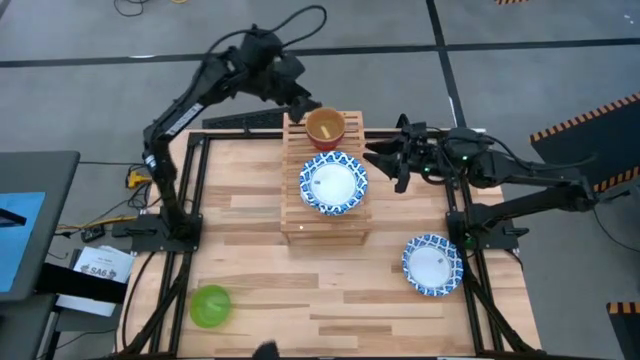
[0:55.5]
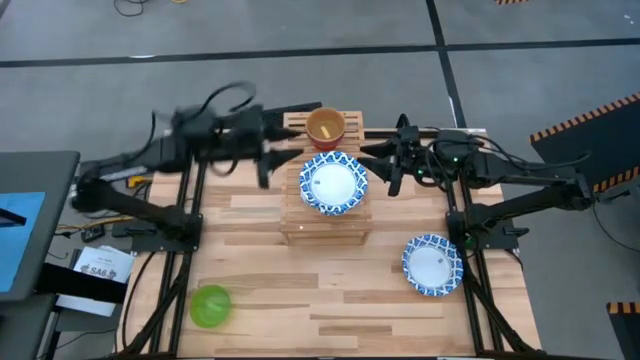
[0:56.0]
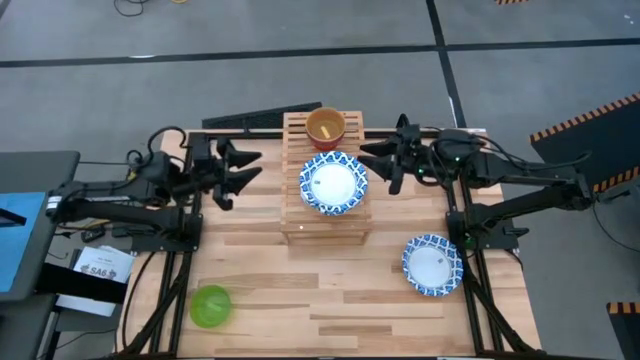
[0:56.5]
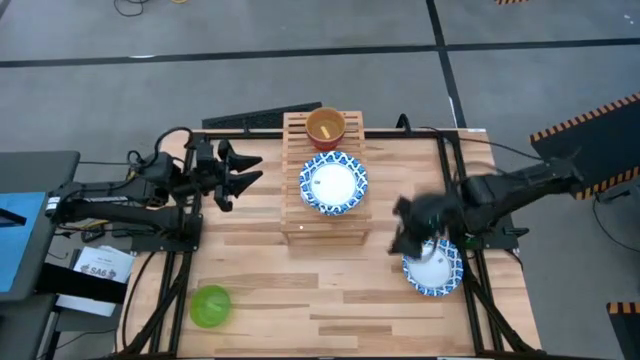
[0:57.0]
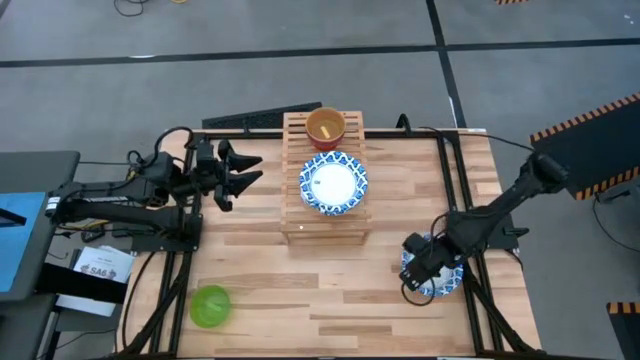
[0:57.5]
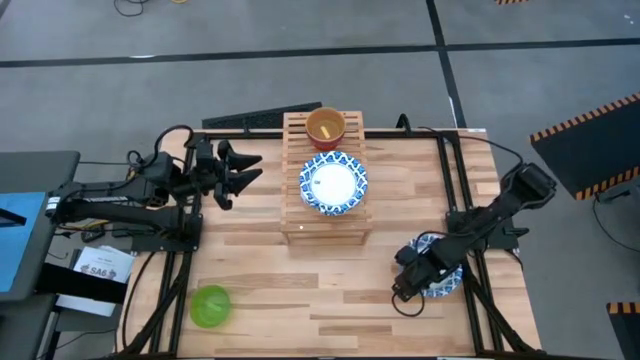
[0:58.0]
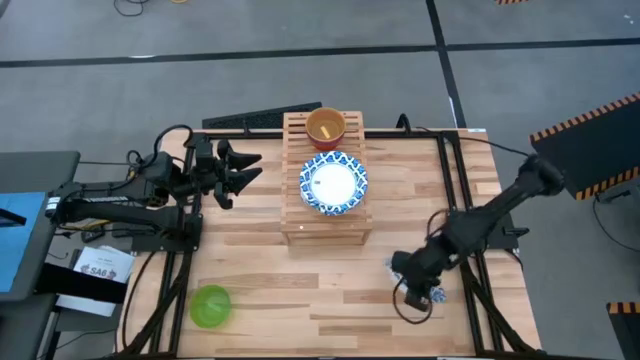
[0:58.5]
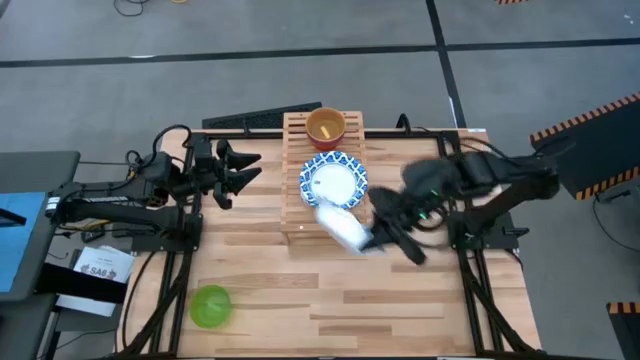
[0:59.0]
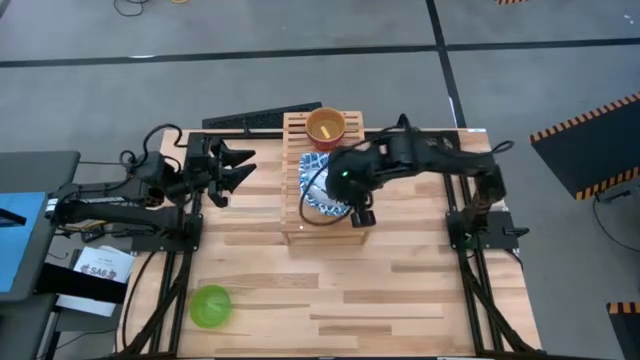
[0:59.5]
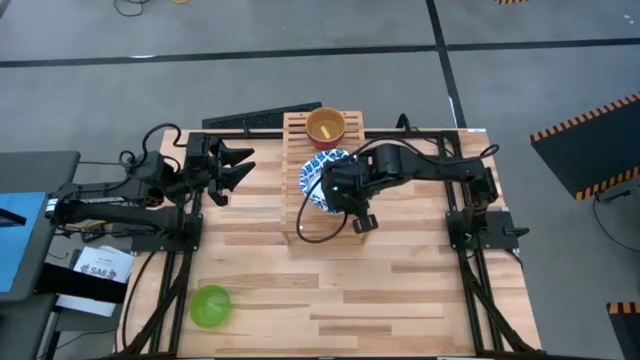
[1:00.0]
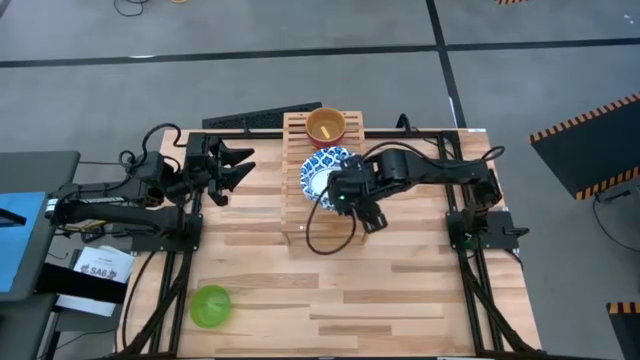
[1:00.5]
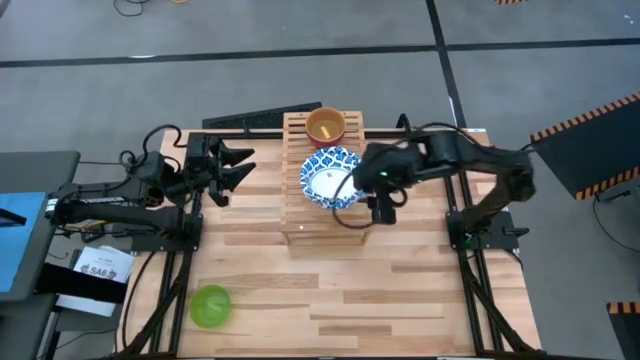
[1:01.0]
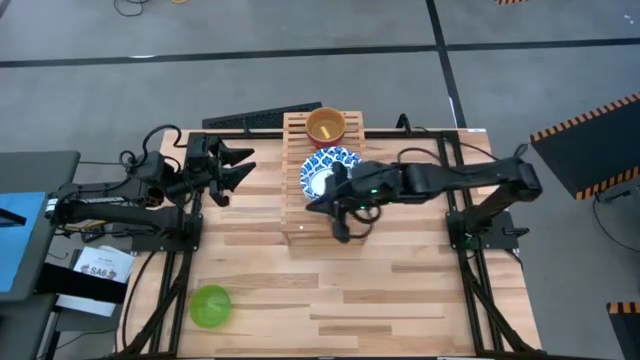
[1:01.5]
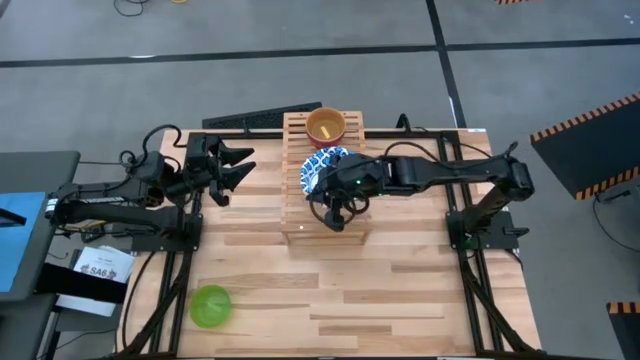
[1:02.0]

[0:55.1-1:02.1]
Task: Place and stack bowls onto a shelf
Stack the blue patterned bowl on top of the blue patterned bowl on the shelf

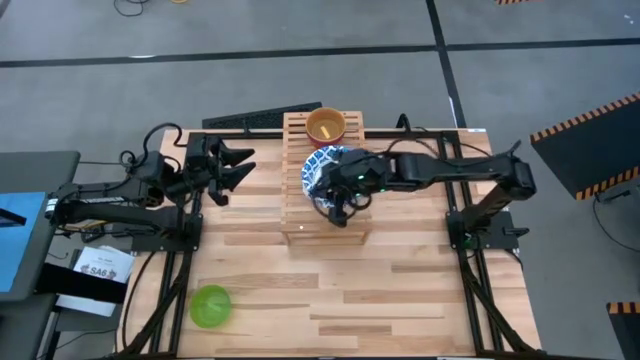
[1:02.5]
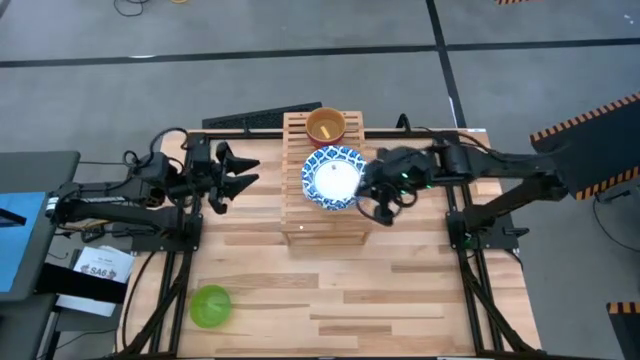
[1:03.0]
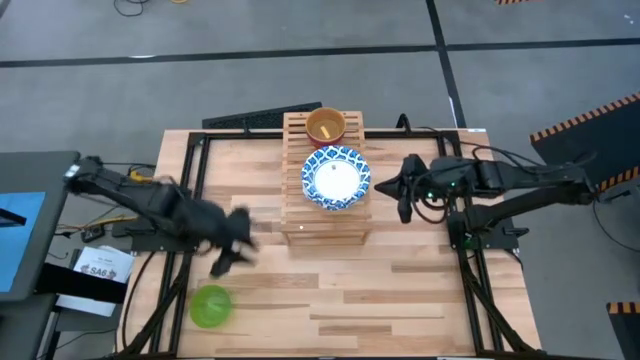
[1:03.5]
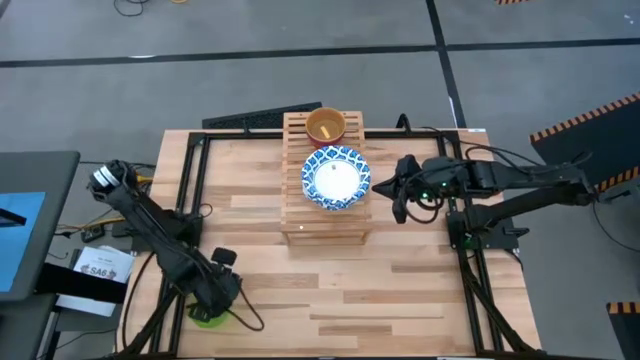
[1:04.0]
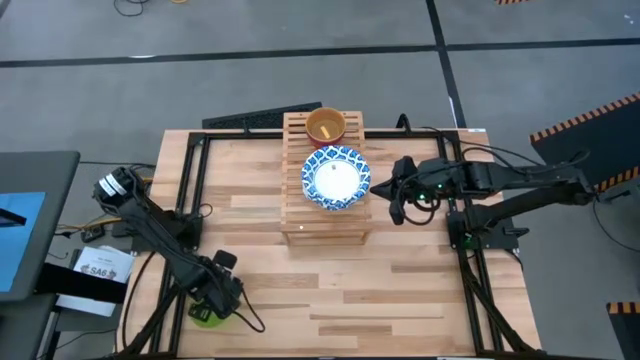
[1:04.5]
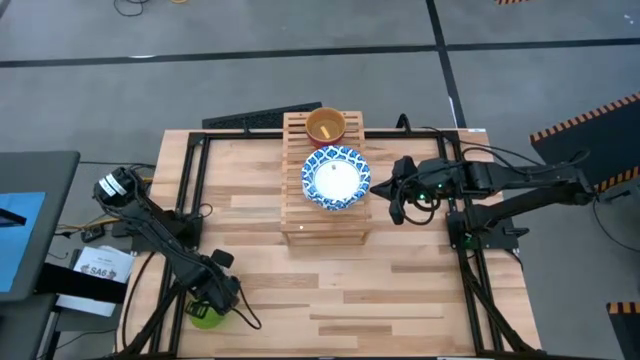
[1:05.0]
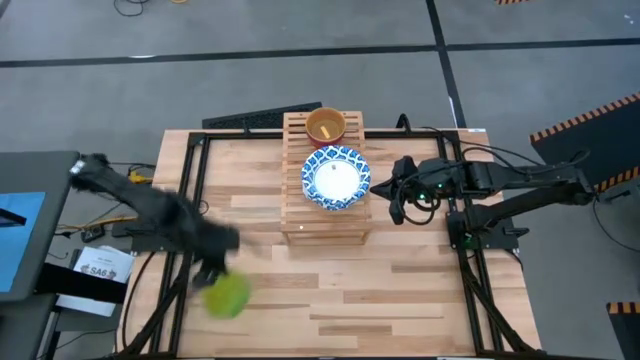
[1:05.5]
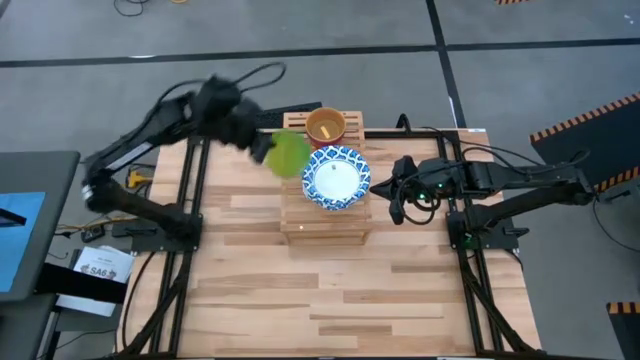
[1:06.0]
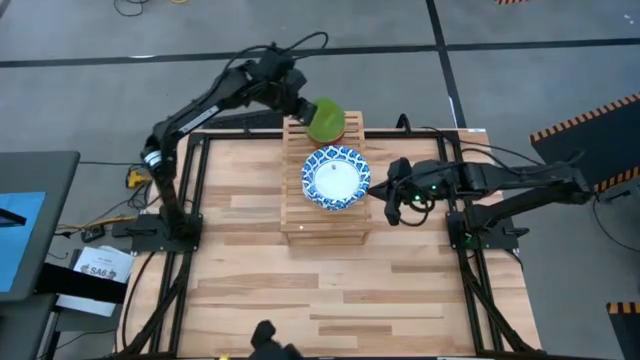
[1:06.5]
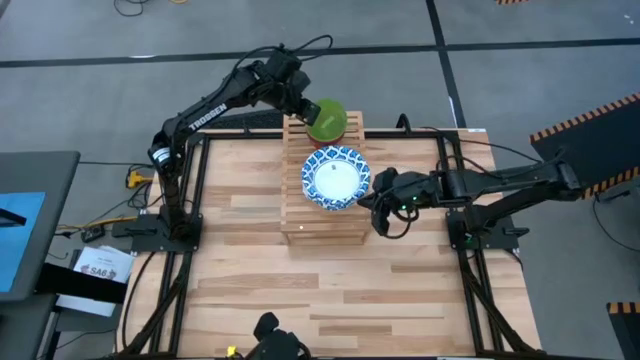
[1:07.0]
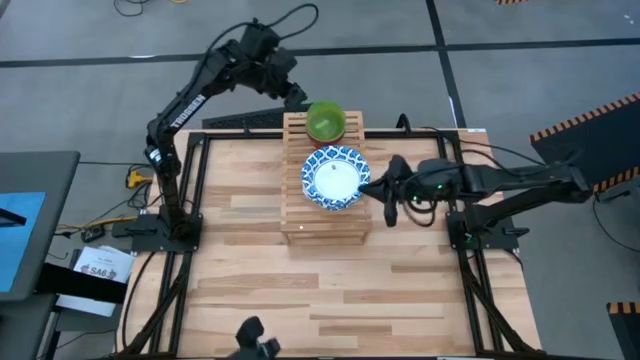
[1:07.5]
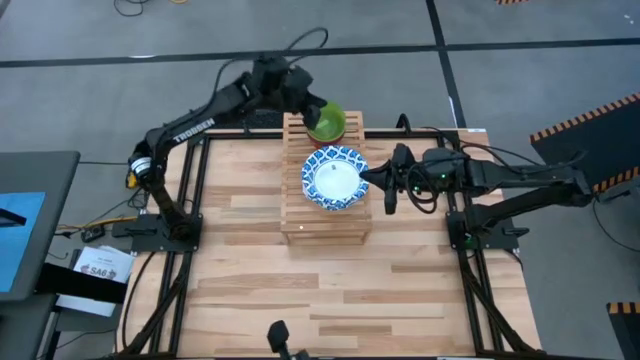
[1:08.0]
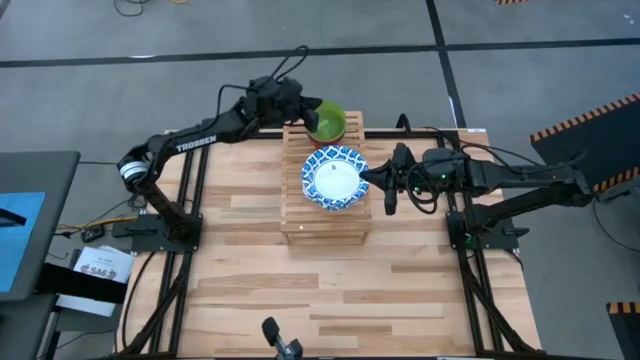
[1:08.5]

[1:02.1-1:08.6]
Stack the green bowl on top of the yellow bowl on the shelf

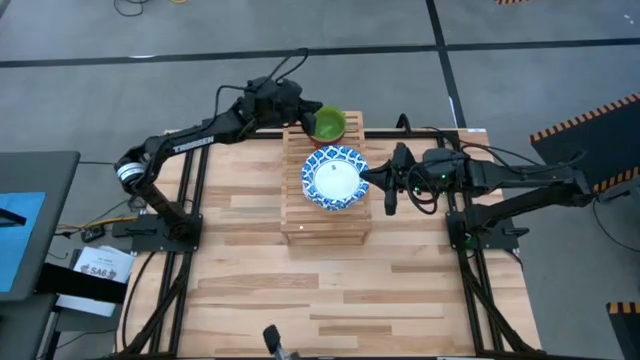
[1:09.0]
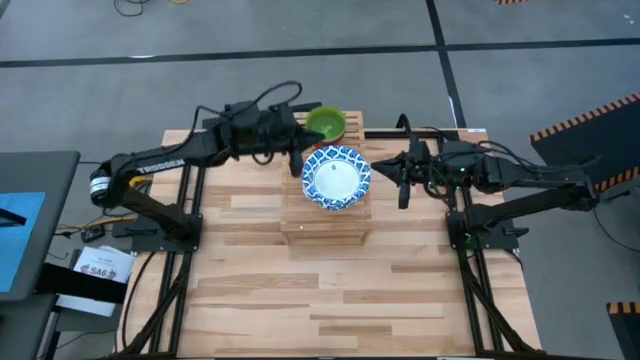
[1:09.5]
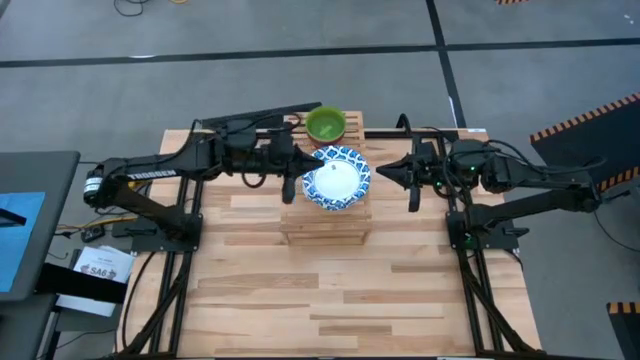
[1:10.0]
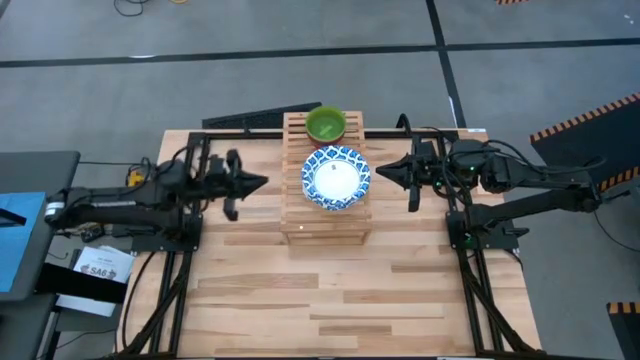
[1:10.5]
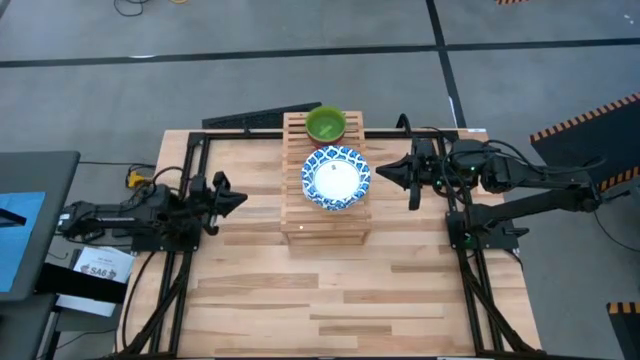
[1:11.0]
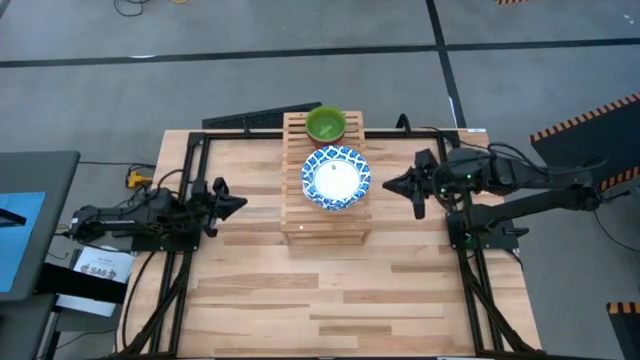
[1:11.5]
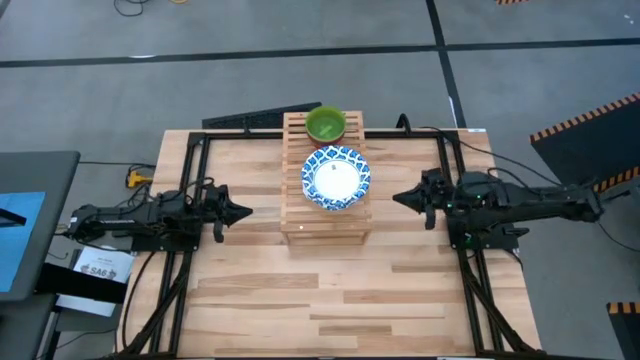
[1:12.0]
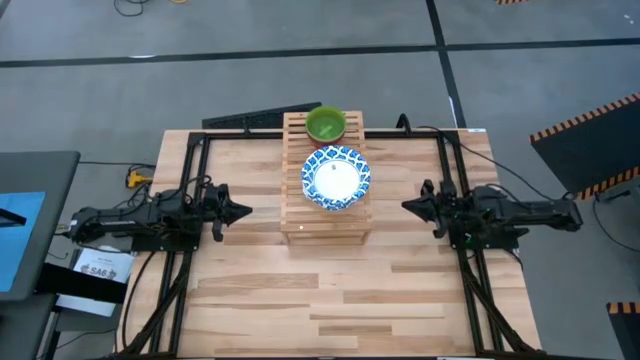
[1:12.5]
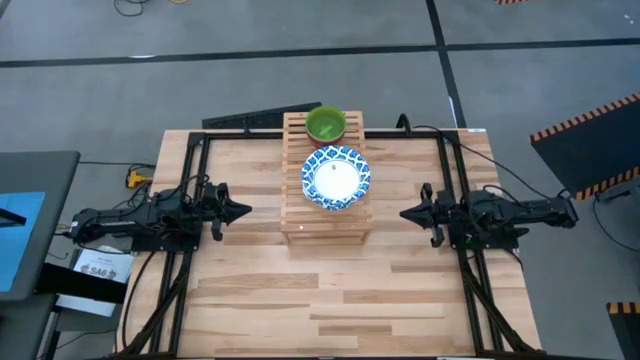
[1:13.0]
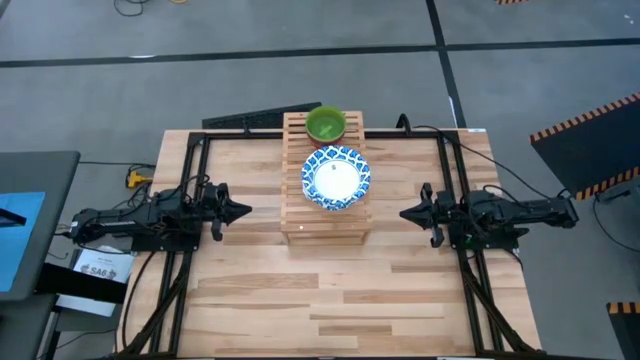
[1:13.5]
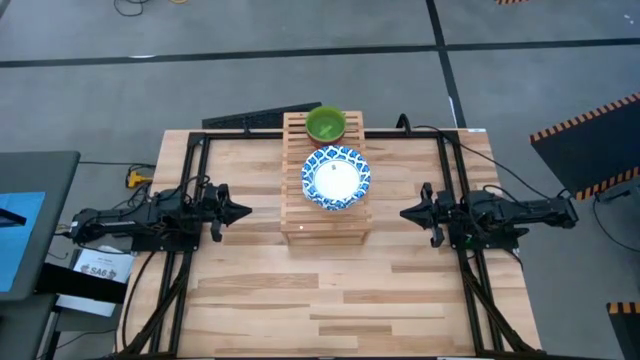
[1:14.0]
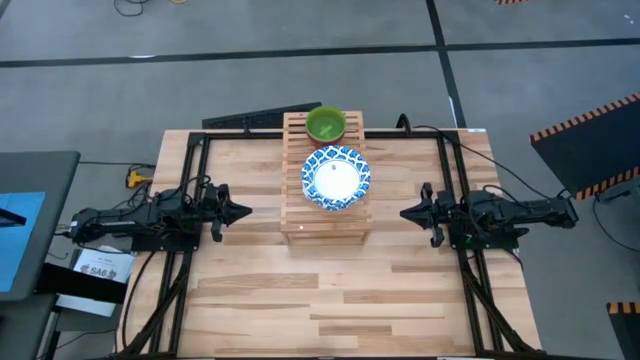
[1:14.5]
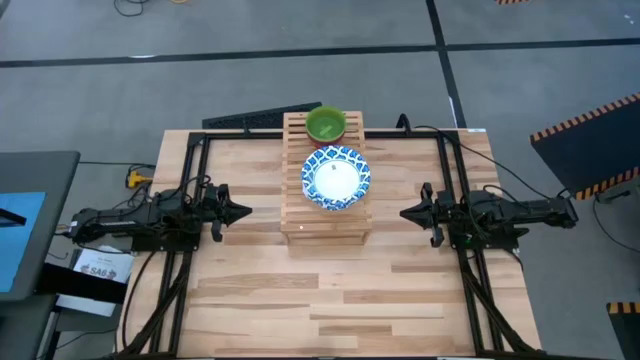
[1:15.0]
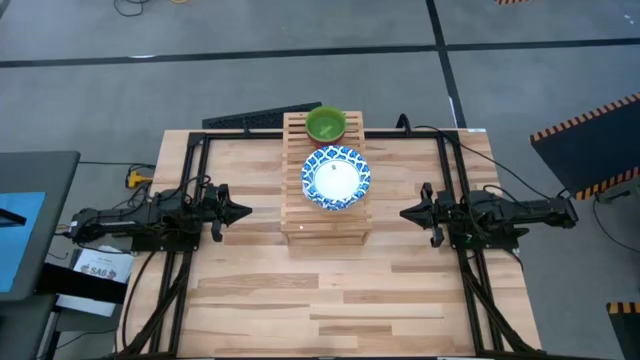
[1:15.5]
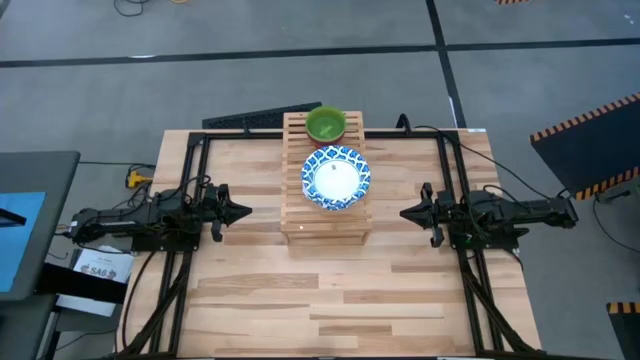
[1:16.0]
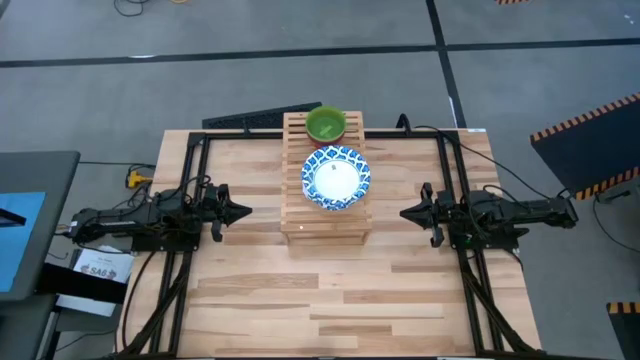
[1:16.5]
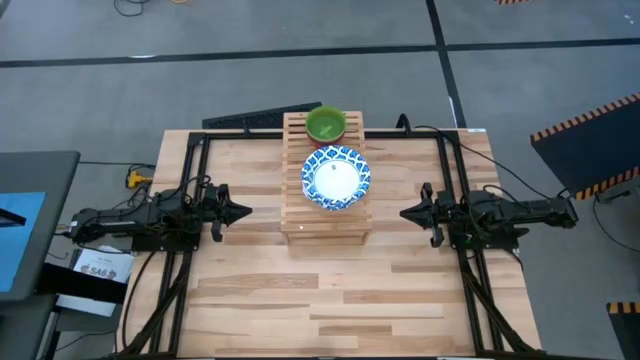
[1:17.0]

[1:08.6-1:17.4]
Return to Home Position
